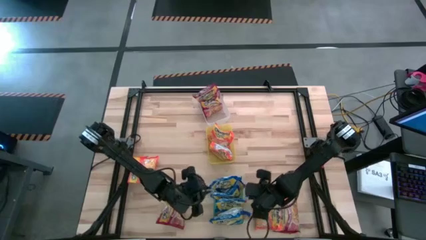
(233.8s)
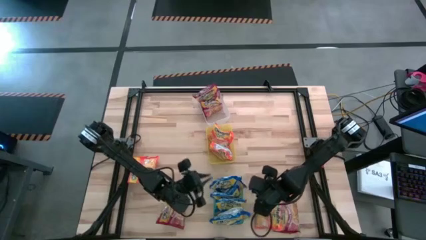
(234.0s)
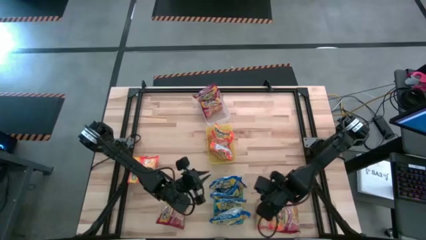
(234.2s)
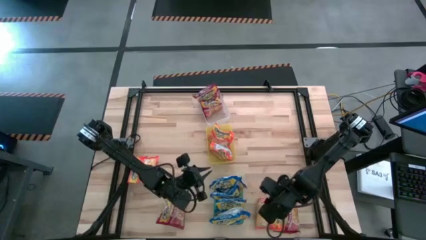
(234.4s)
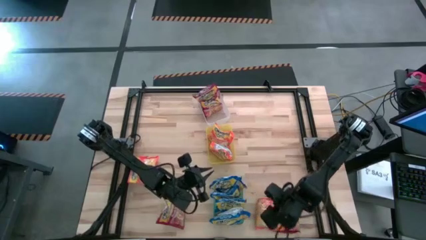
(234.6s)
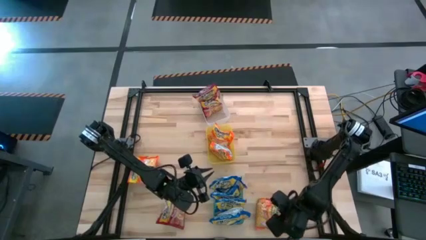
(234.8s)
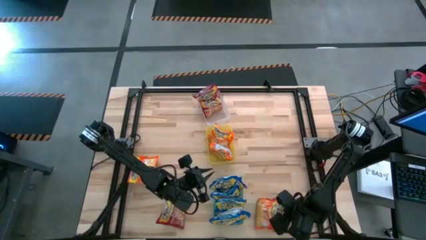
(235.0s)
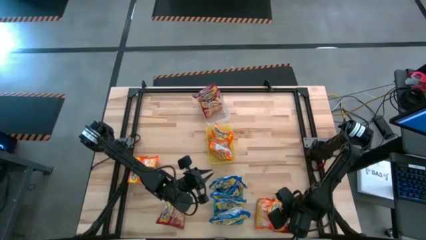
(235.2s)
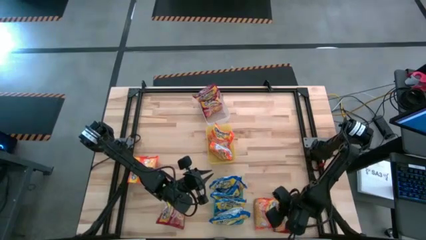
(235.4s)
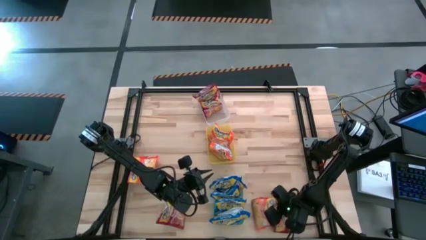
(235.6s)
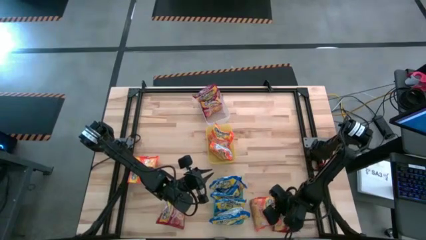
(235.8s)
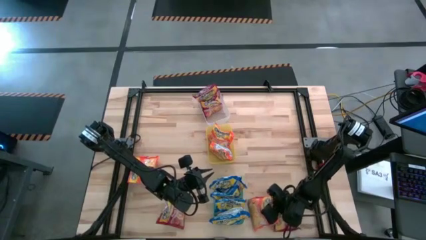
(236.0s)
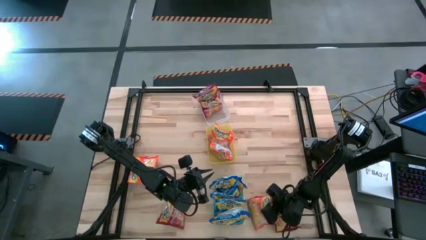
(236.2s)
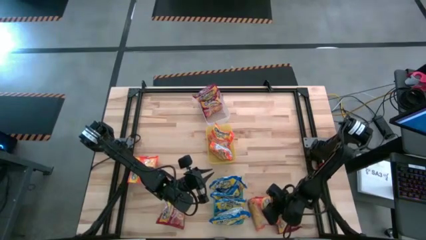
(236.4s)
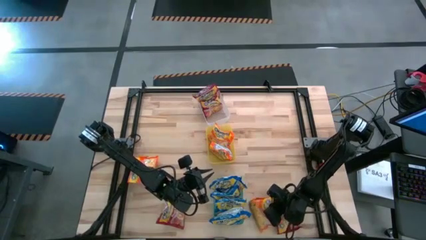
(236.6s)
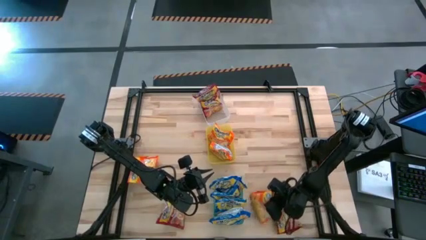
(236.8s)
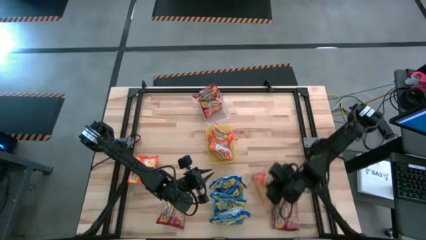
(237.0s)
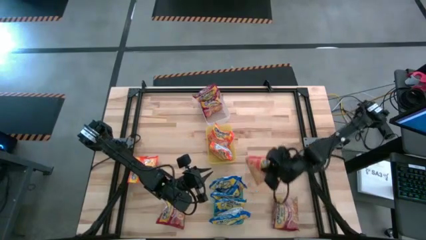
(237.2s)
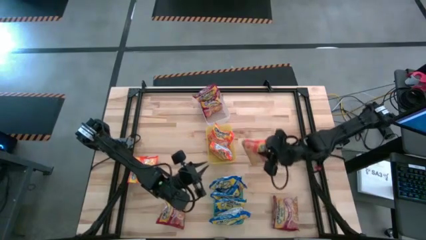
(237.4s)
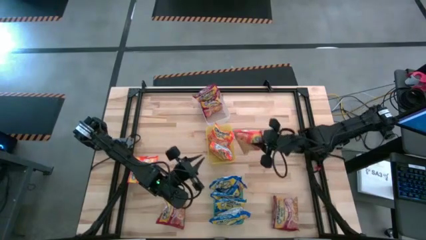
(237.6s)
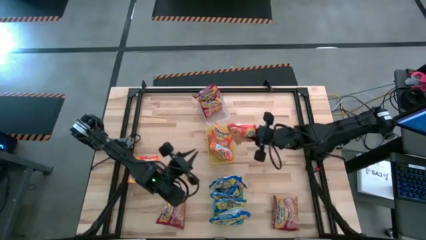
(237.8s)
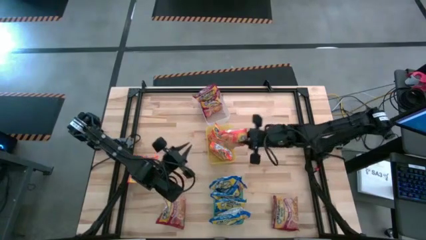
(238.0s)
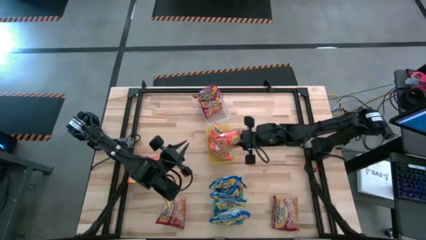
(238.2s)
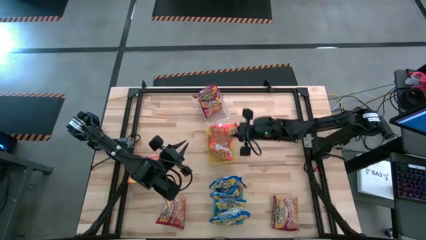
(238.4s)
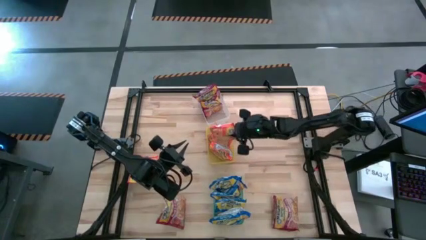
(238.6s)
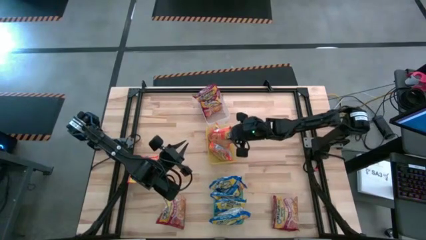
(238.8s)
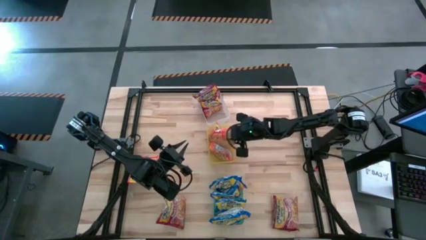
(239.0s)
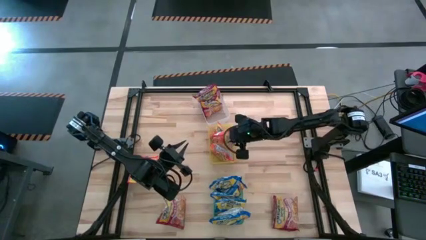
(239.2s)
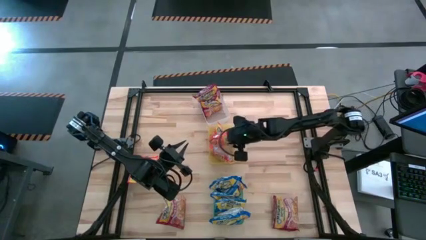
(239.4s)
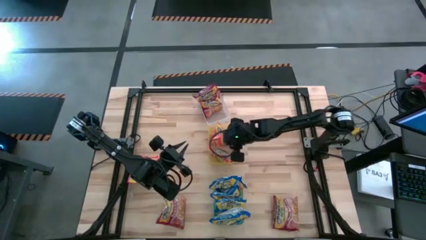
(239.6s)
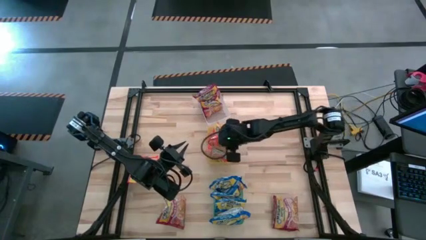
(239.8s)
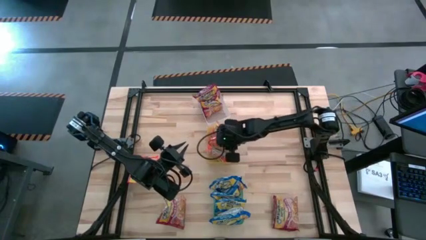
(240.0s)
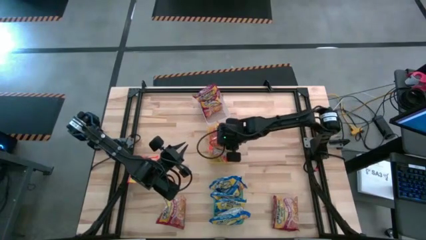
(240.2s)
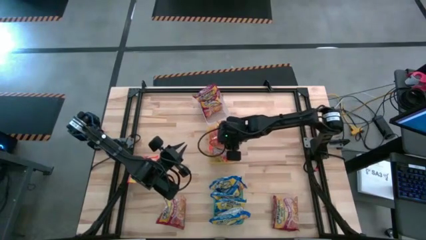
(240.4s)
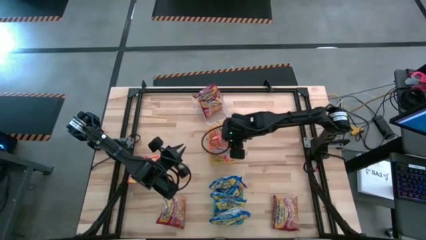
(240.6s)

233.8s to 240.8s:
Task: Sort Maruchan noodles
Put the orange noodle pack into the yellow bin

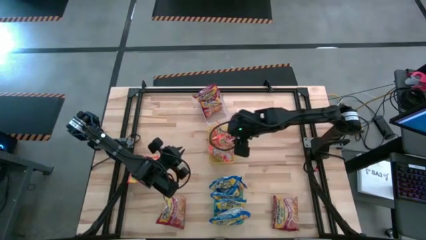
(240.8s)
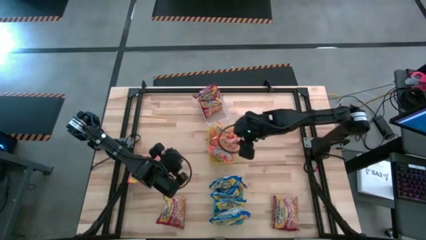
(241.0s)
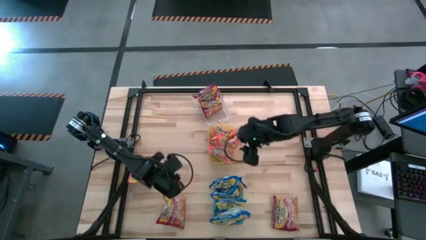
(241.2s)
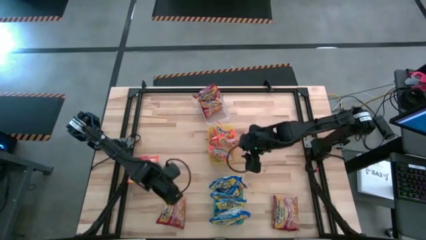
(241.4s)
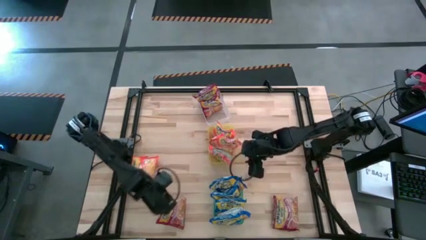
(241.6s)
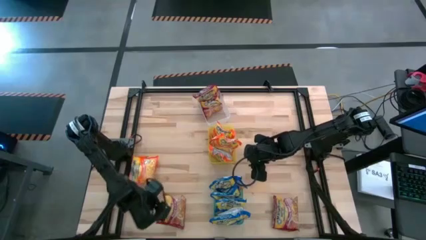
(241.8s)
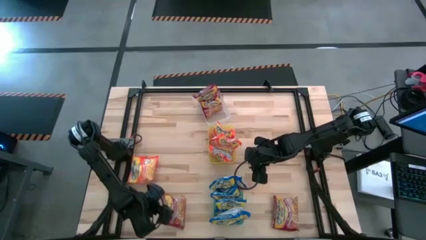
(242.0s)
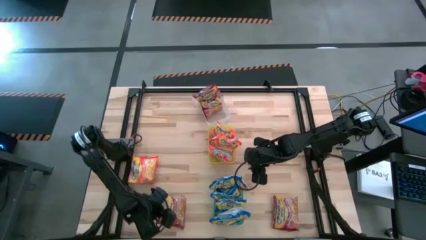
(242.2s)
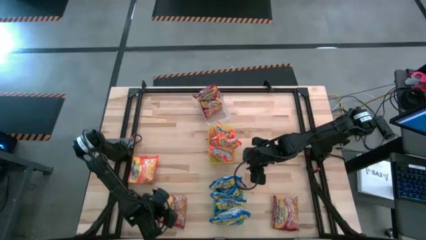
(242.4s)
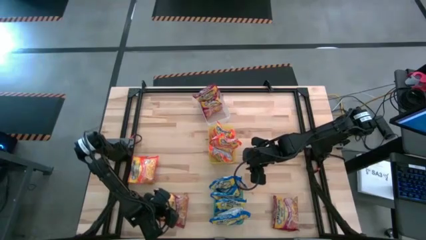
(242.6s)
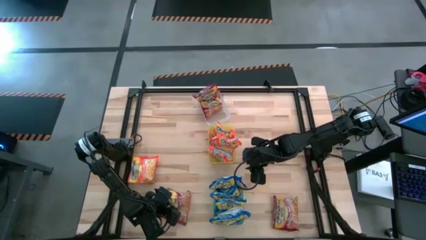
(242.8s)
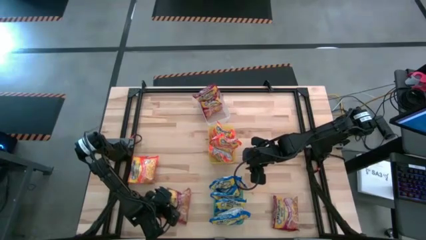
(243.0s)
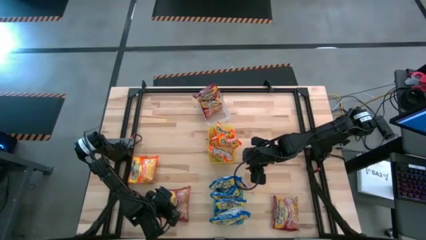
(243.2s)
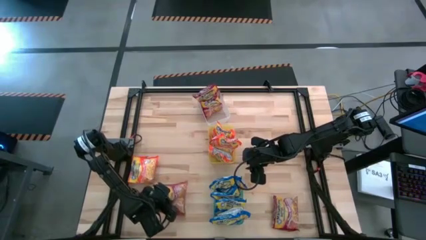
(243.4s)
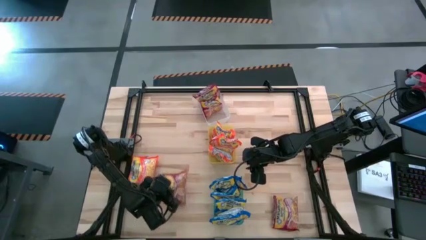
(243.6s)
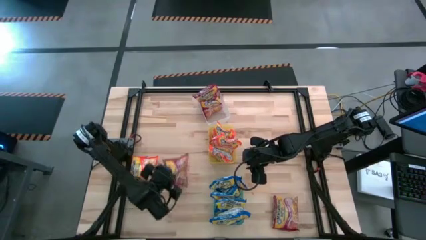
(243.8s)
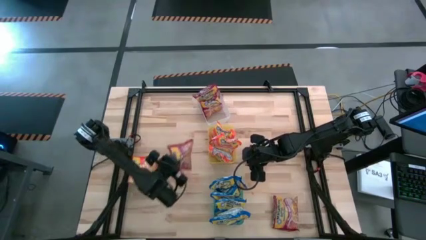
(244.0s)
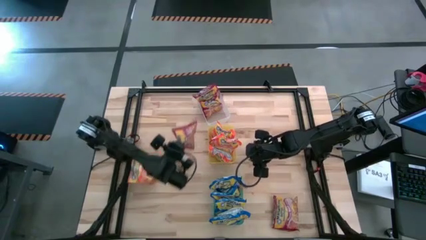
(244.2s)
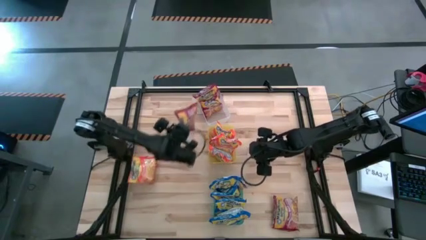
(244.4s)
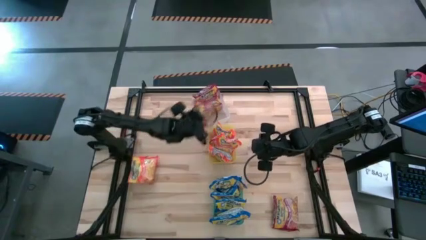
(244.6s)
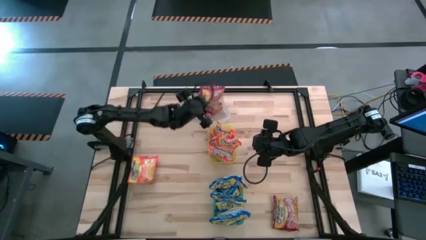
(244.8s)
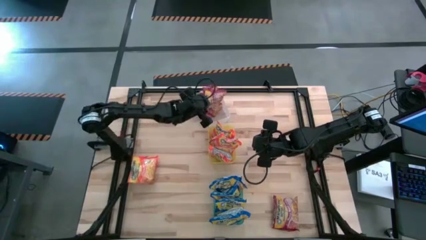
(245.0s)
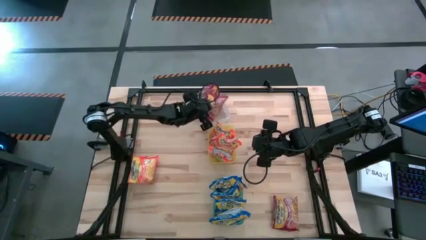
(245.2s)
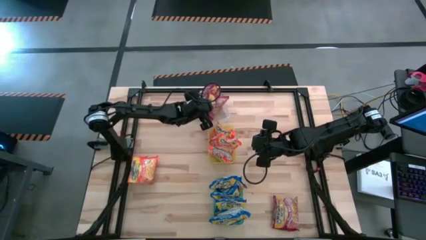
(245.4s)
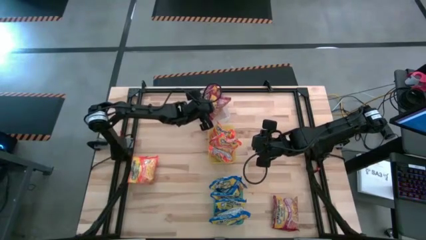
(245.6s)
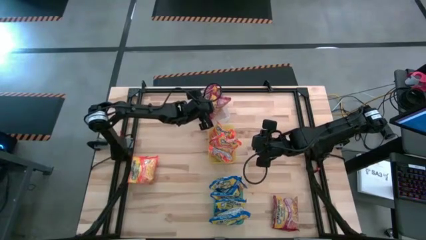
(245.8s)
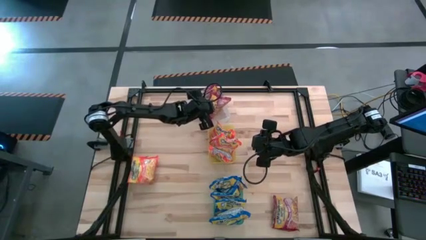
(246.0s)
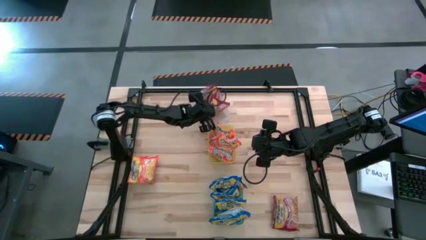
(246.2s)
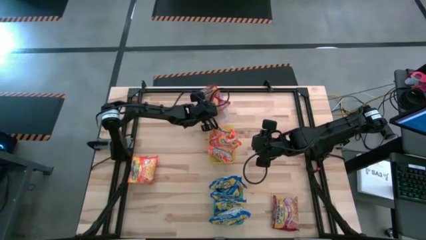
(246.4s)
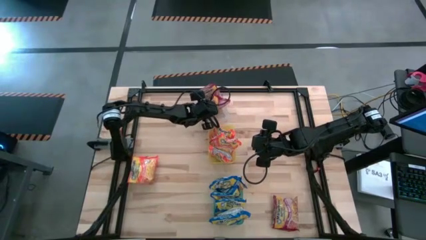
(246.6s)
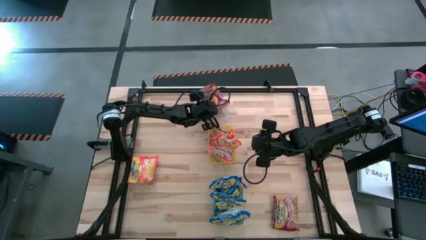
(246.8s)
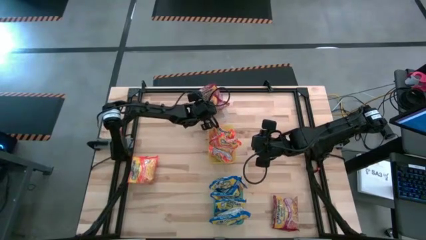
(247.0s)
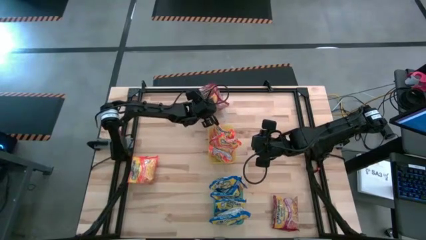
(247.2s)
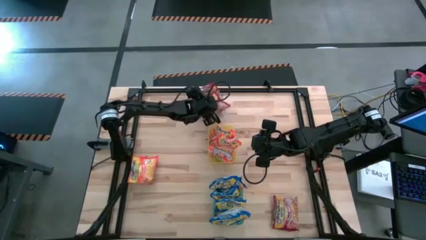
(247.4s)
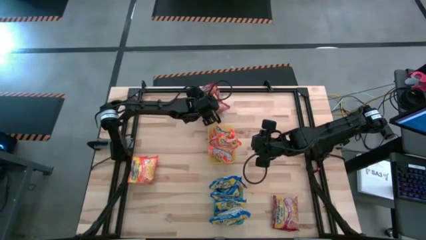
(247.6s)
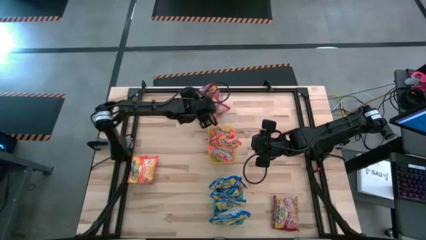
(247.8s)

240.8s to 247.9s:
Put the red noodle pack into the transparent bin
